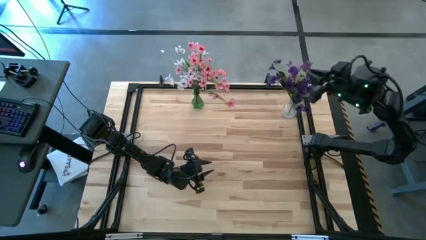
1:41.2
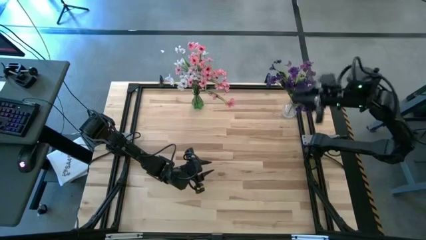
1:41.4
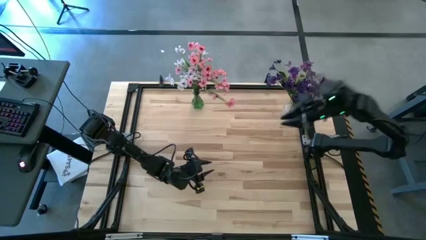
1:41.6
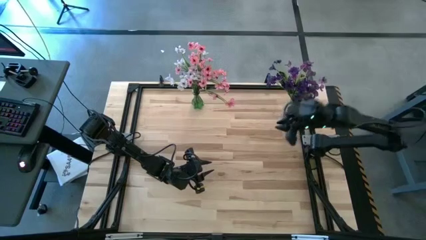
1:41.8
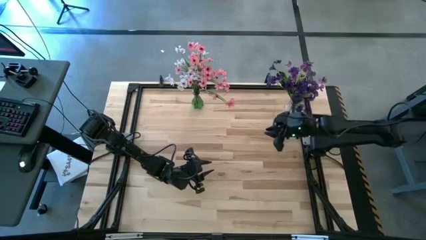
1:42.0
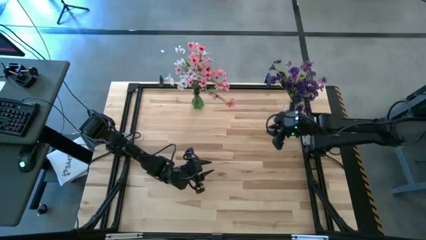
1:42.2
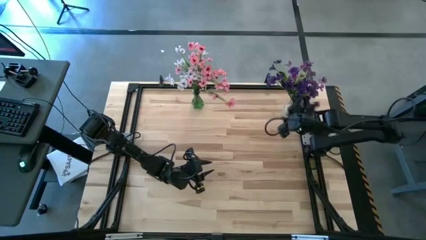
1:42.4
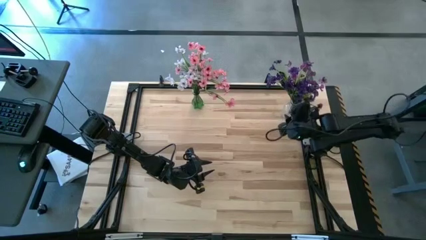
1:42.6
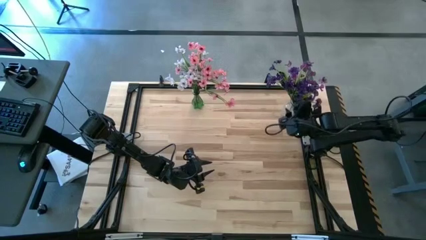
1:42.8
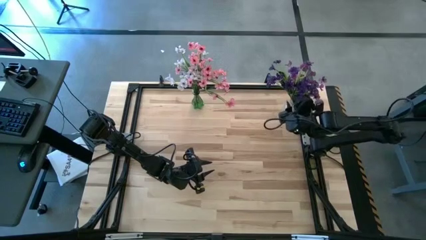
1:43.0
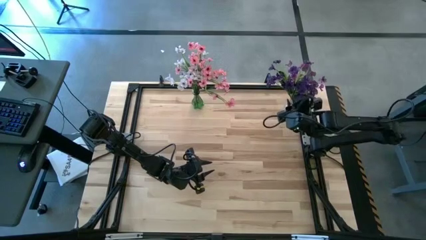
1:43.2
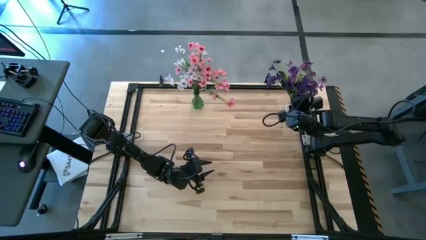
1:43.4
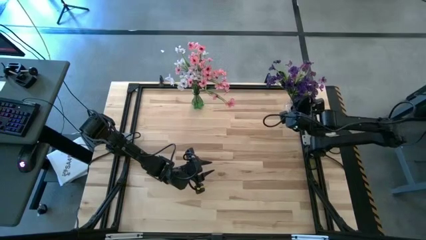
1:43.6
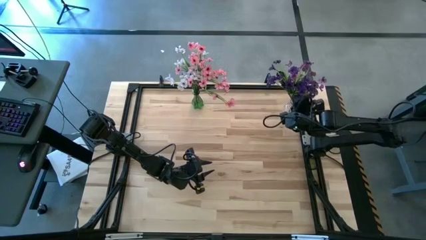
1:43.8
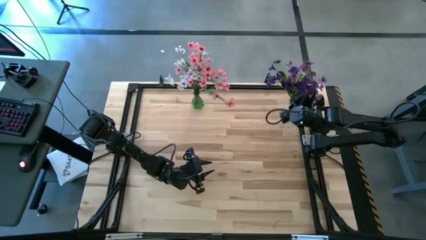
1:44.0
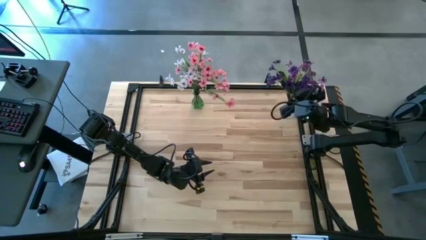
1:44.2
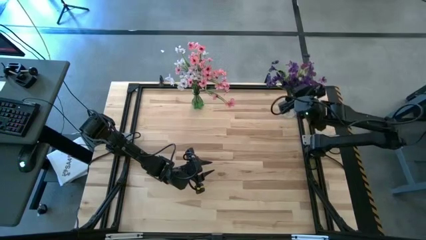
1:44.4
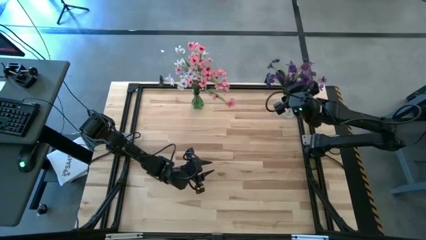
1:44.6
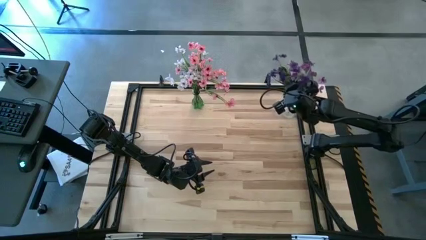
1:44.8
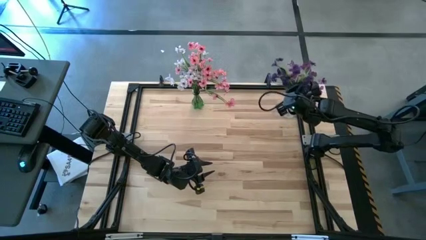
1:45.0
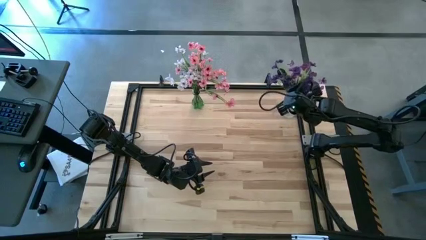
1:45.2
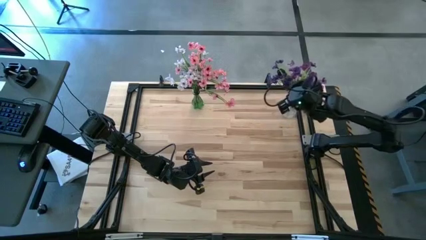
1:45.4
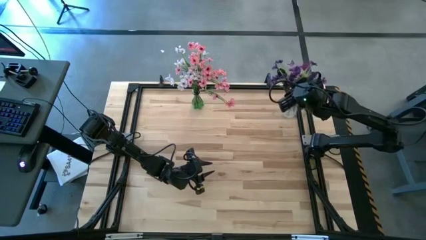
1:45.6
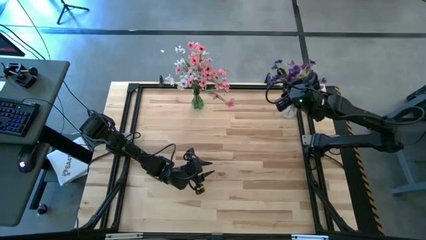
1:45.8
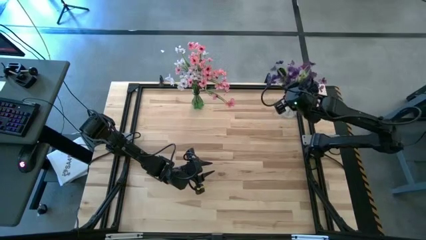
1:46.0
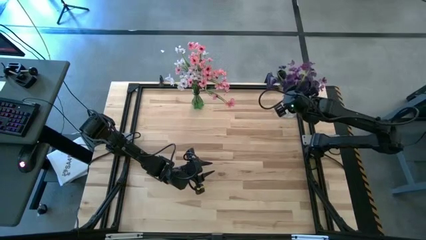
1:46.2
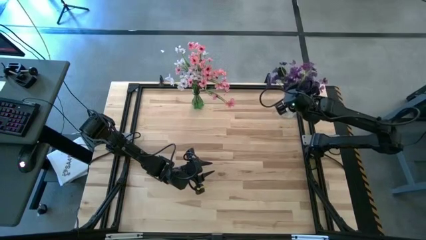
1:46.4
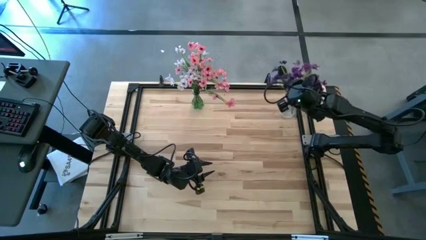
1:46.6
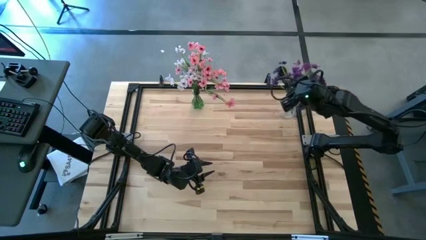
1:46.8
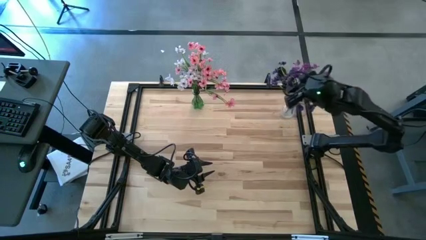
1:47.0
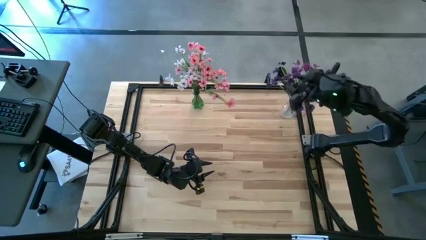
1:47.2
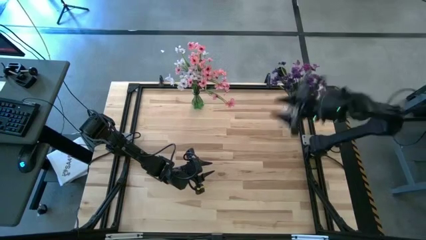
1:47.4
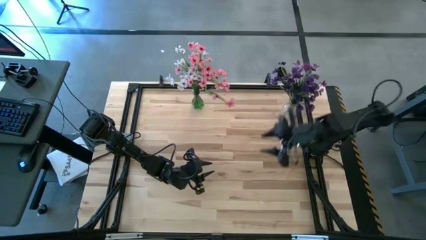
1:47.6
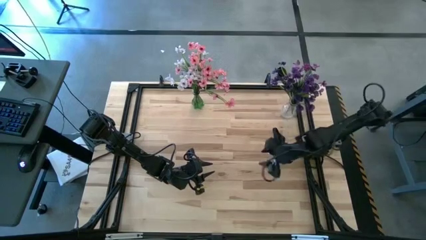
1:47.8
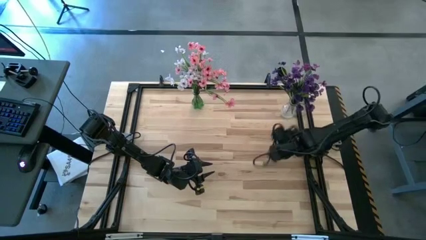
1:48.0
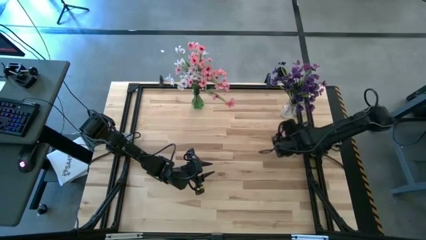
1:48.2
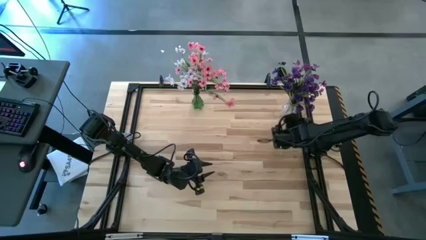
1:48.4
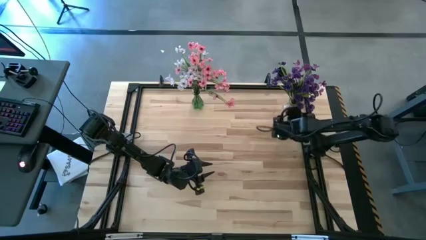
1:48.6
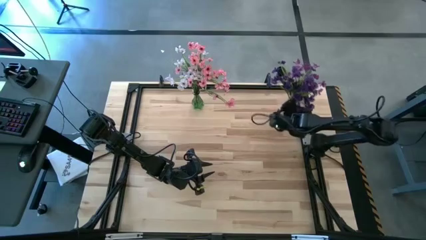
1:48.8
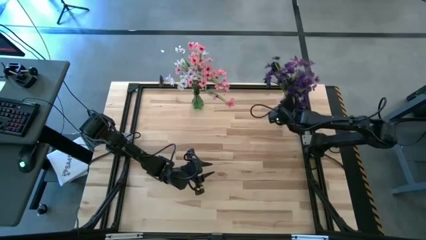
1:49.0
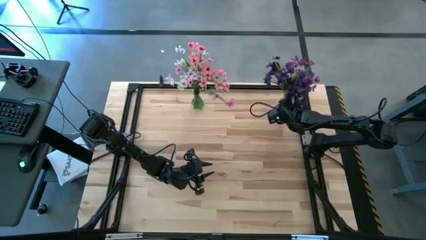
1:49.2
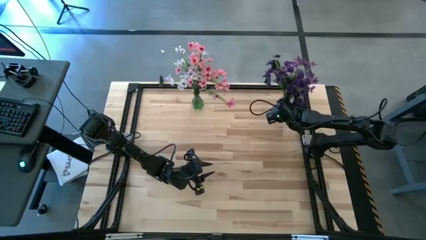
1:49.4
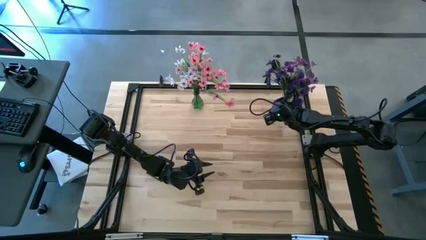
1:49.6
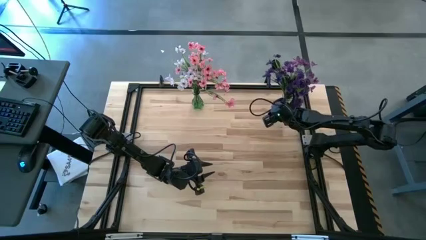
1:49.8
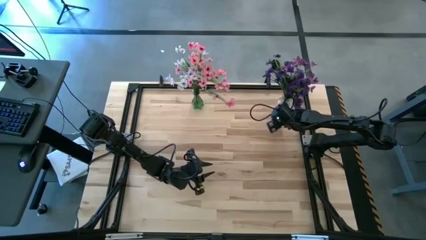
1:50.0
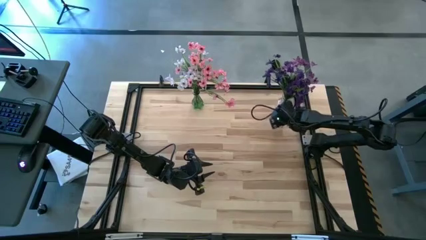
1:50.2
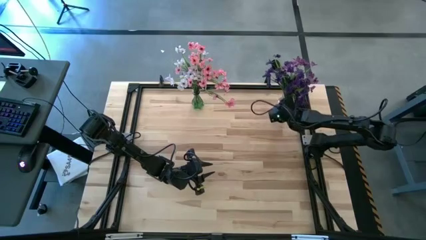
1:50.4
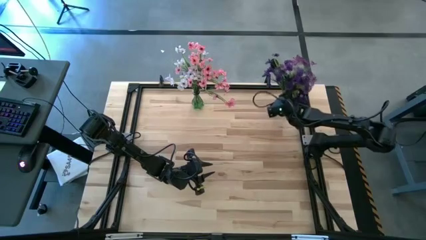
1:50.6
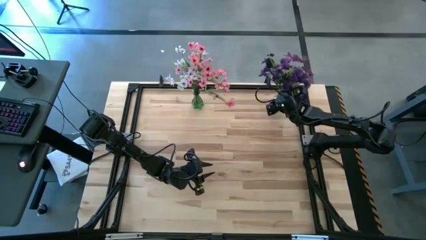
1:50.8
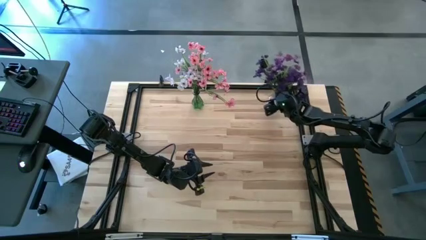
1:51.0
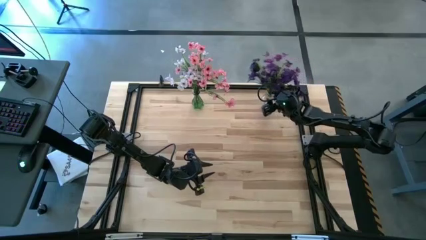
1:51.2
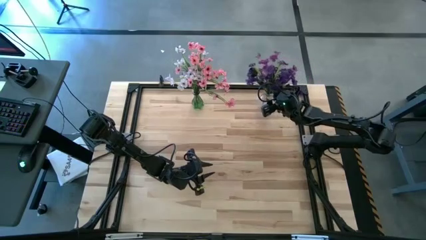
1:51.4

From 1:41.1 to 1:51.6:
Task: Sort flowers into vase by color
Put the purple flowers into the transparent vase

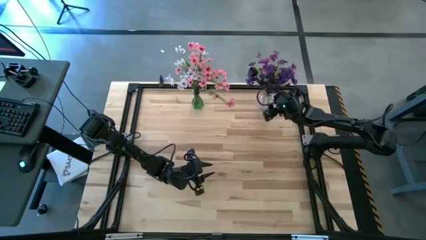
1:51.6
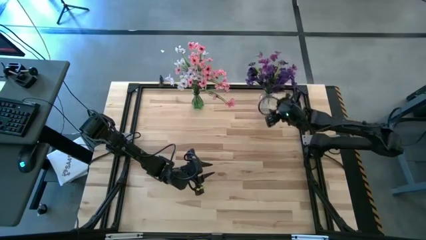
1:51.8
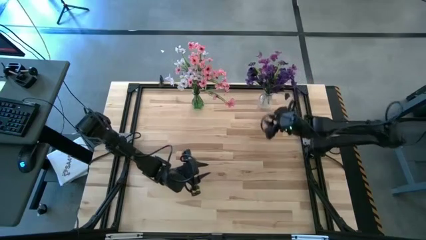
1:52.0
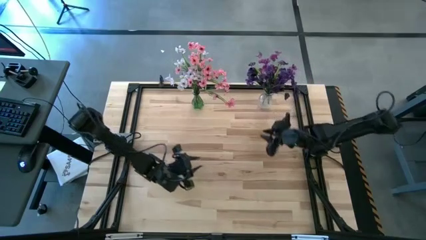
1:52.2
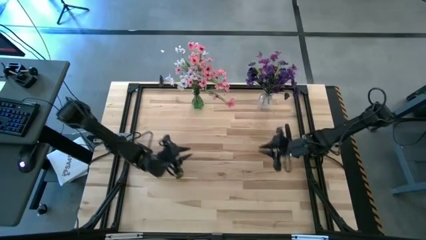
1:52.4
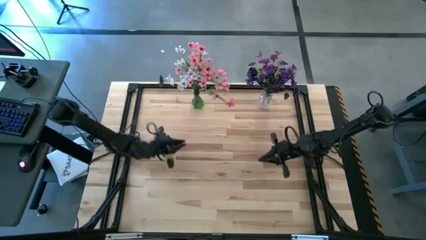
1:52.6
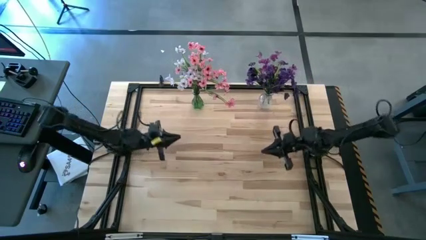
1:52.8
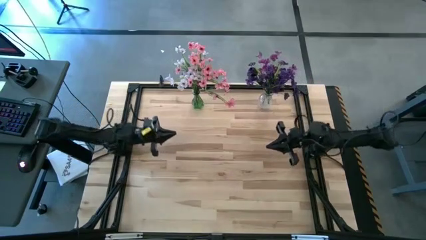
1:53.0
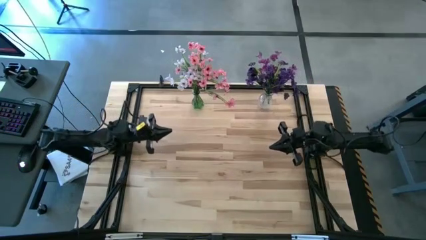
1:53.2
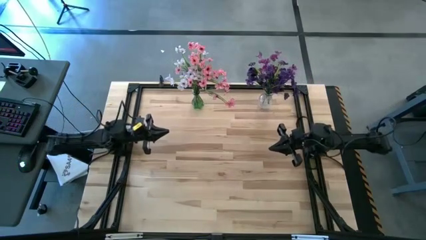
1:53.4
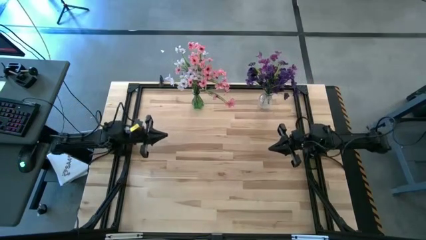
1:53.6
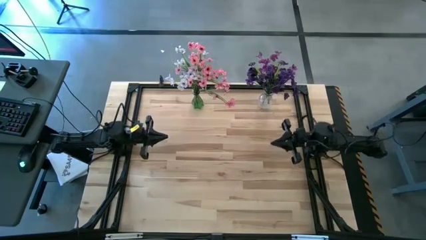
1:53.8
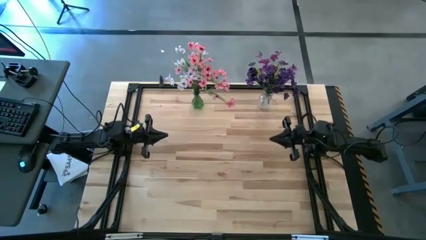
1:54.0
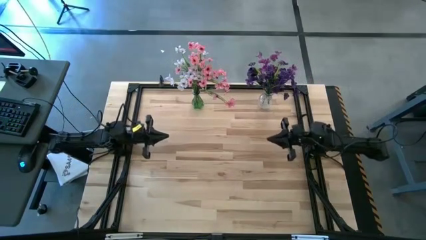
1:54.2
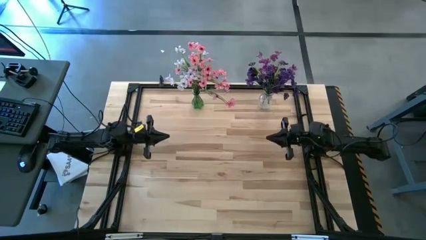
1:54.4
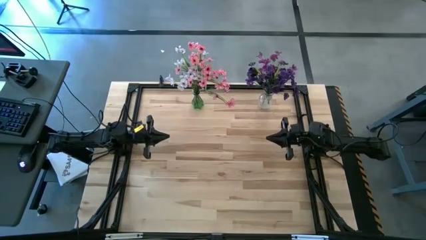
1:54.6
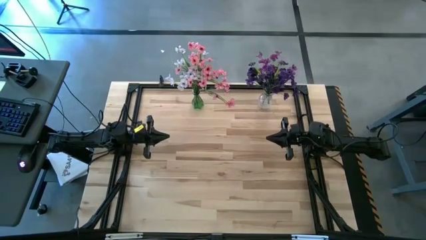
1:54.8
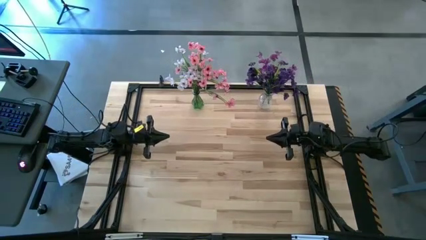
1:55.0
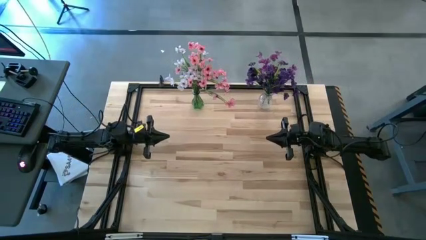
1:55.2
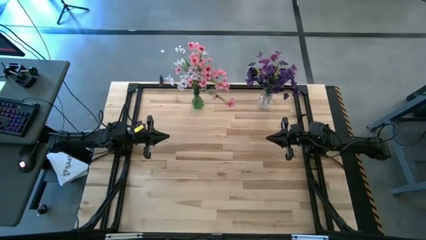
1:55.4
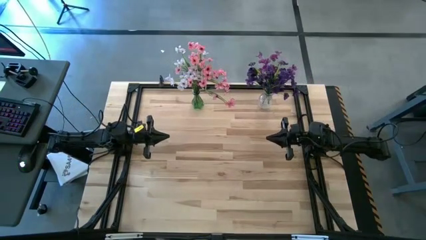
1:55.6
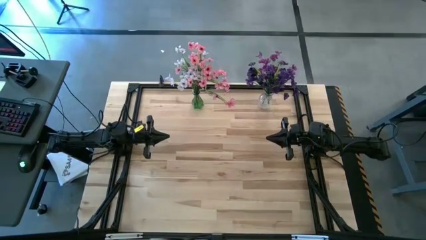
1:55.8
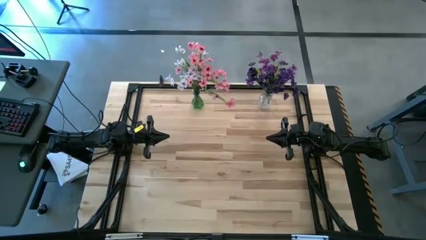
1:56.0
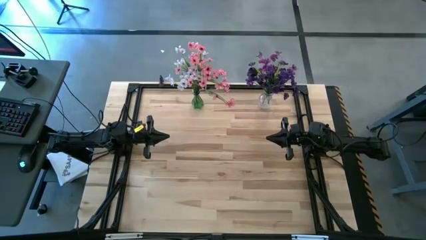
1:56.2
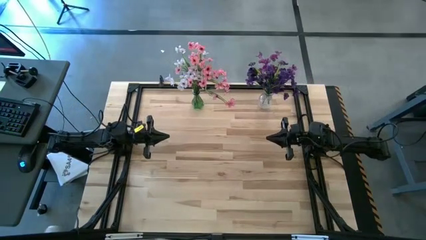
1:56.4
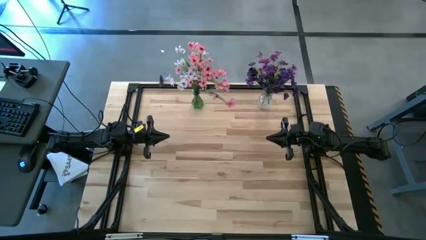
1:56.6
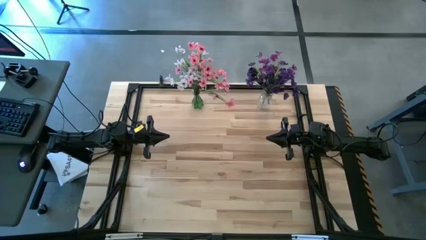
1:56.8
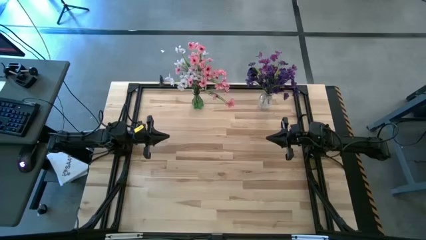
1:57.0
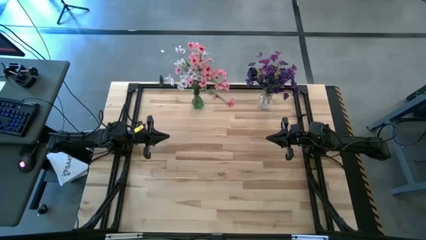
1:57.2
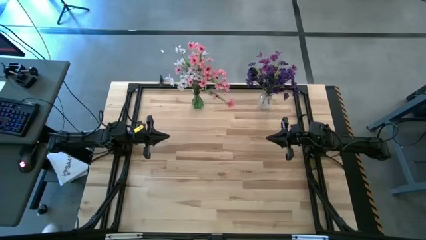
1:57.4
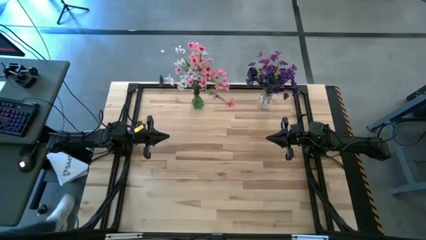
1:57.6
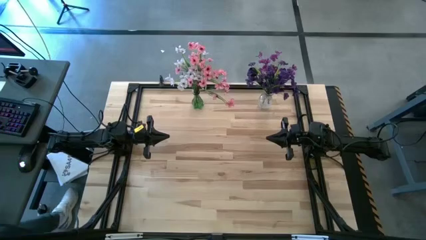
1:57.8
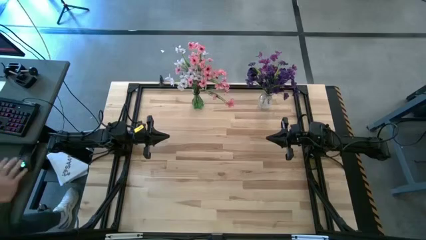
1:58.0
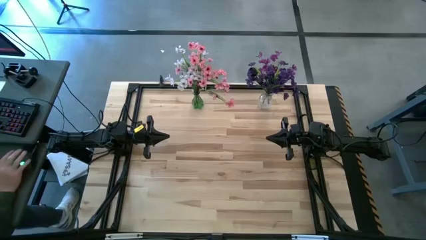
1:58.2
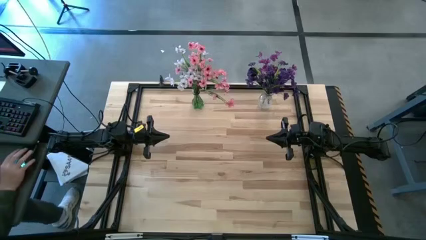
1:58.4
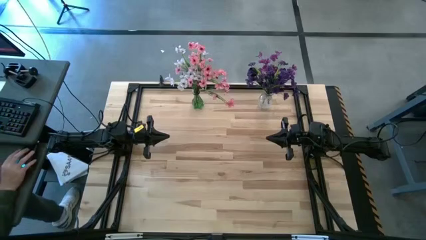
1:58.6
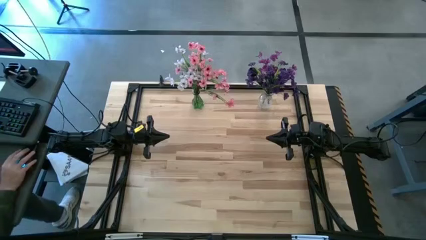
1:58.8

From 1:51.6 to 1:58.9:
Return to Home Position
